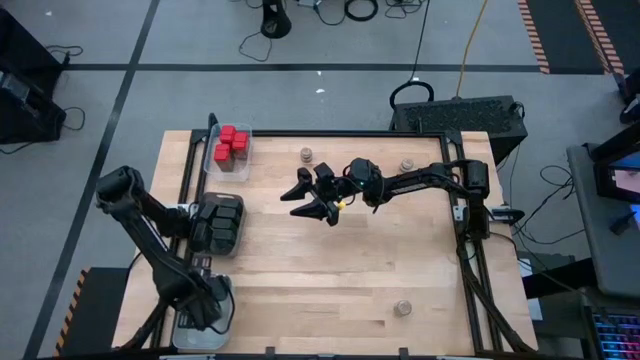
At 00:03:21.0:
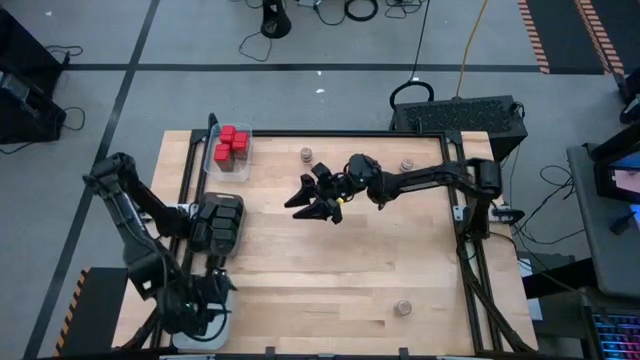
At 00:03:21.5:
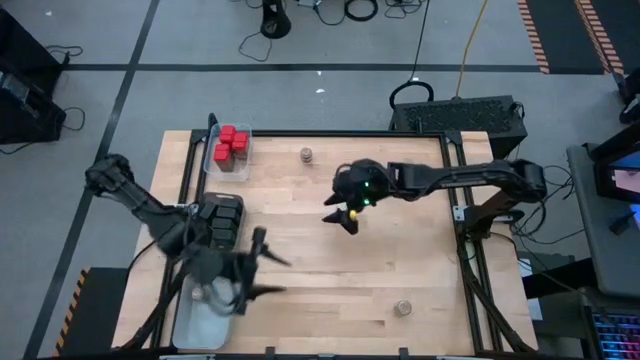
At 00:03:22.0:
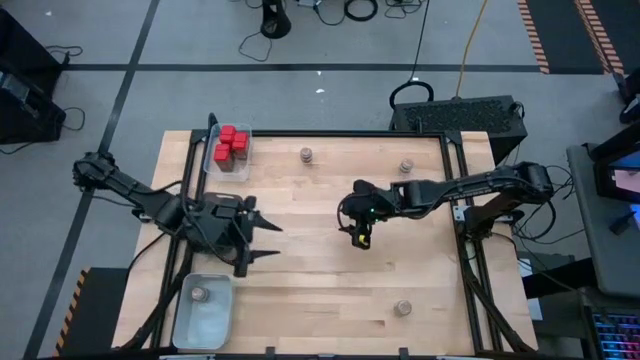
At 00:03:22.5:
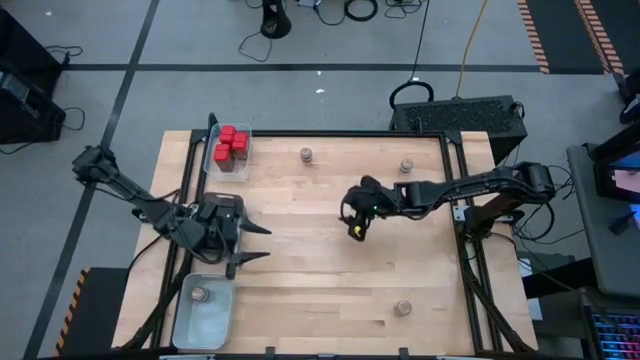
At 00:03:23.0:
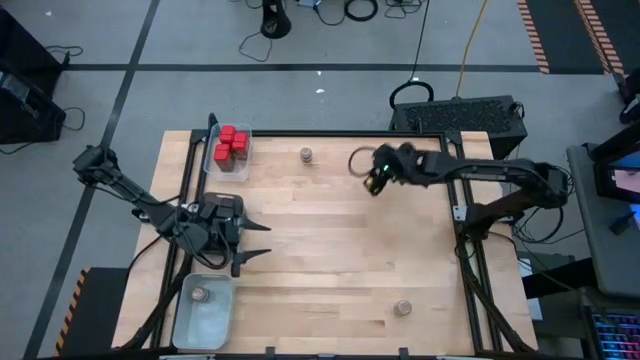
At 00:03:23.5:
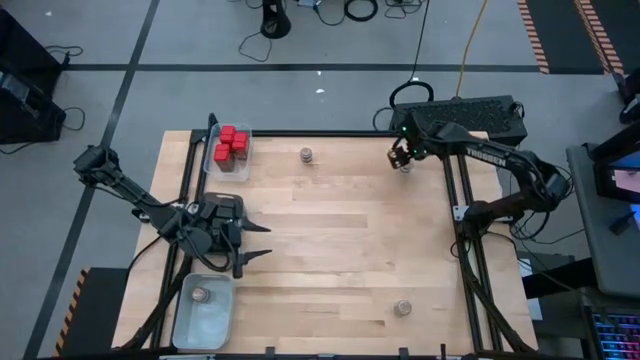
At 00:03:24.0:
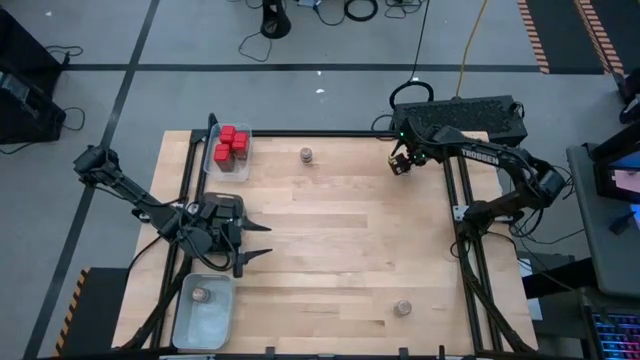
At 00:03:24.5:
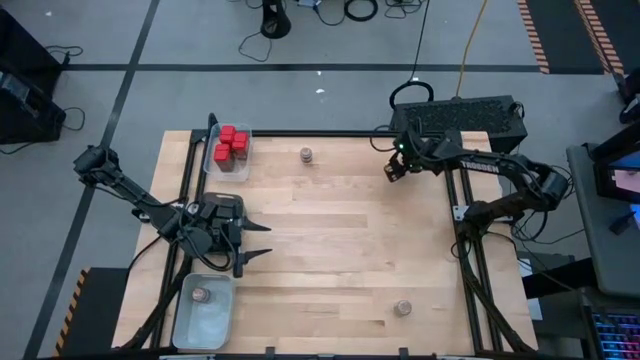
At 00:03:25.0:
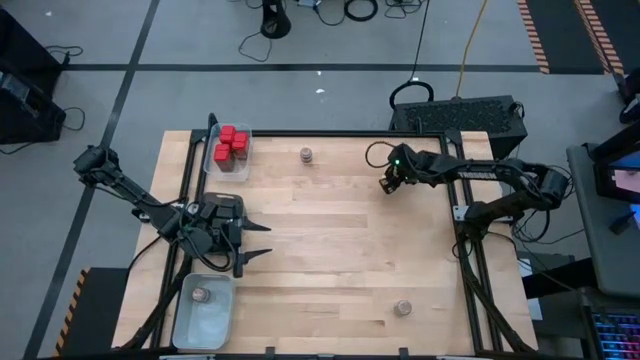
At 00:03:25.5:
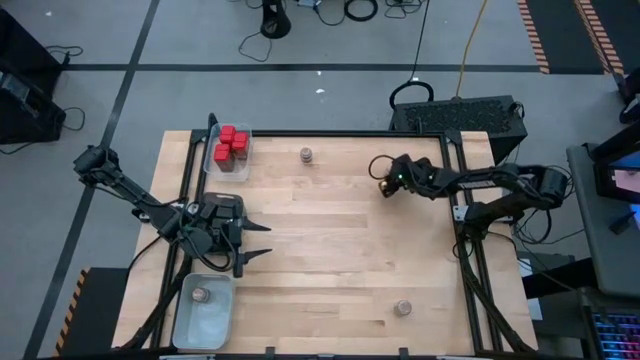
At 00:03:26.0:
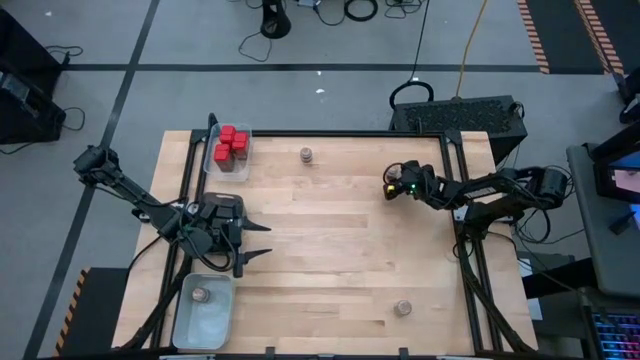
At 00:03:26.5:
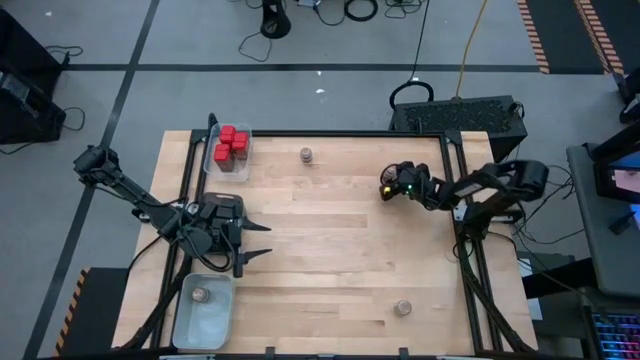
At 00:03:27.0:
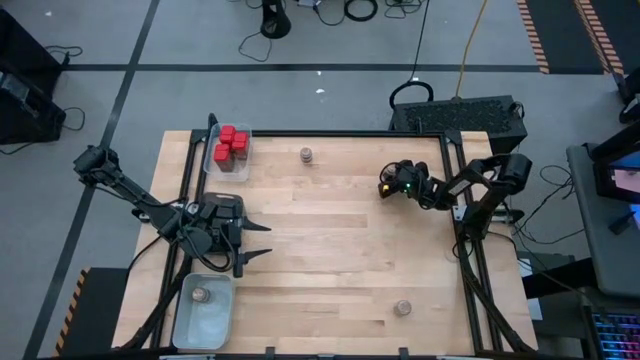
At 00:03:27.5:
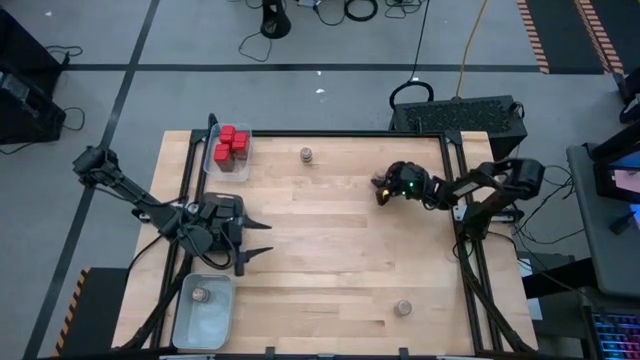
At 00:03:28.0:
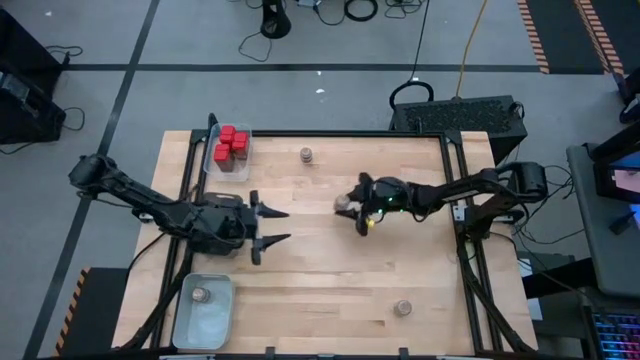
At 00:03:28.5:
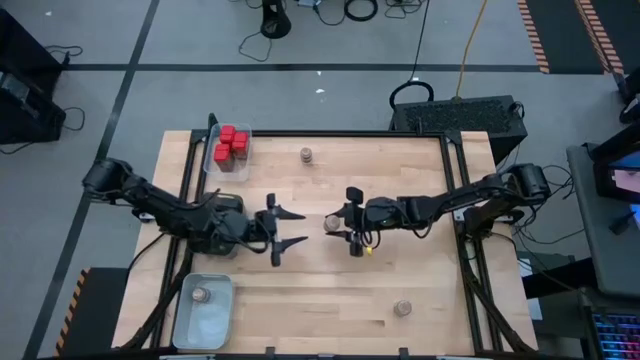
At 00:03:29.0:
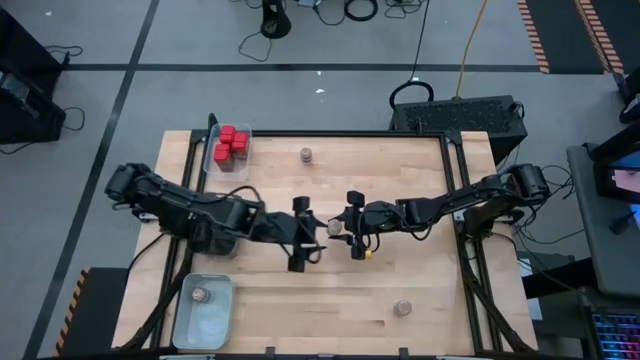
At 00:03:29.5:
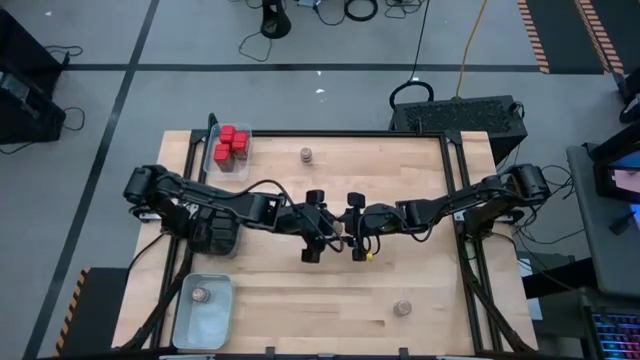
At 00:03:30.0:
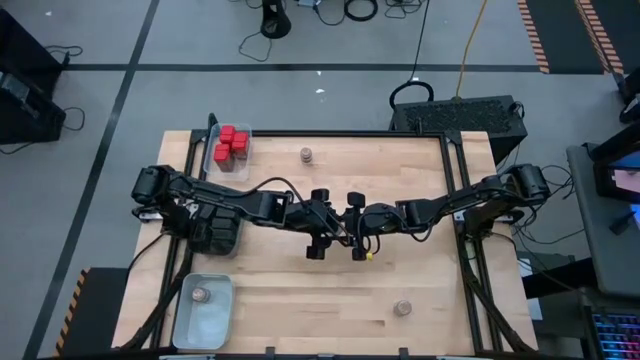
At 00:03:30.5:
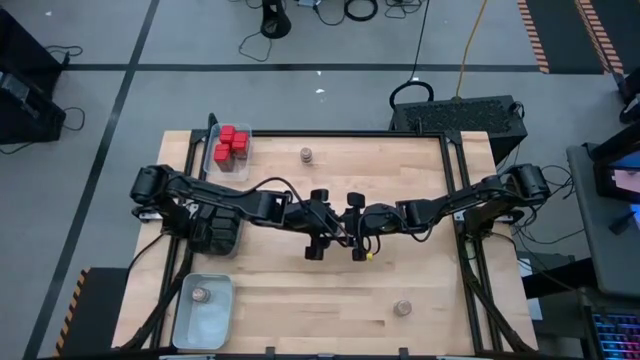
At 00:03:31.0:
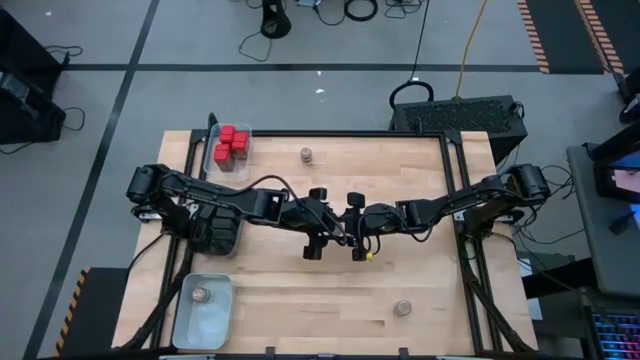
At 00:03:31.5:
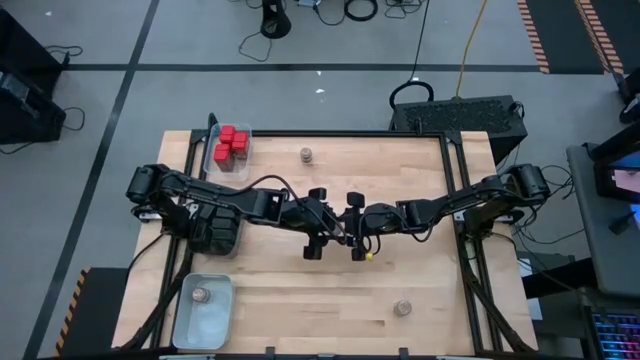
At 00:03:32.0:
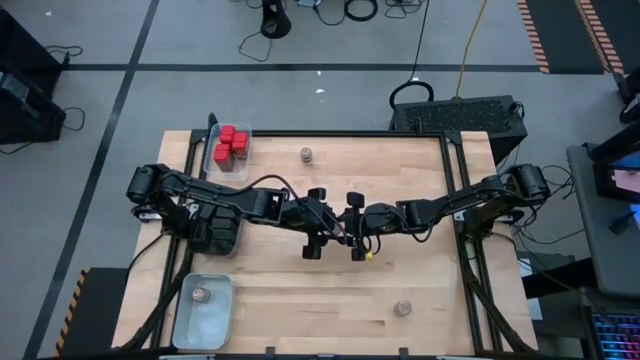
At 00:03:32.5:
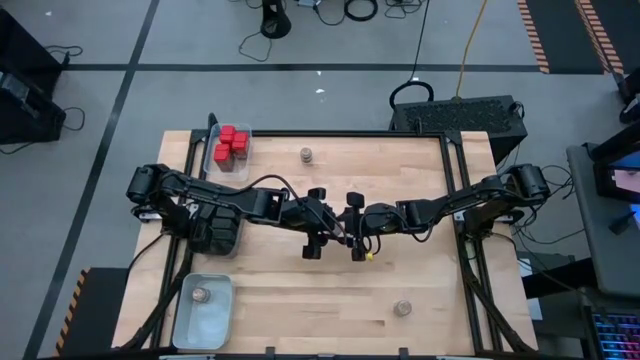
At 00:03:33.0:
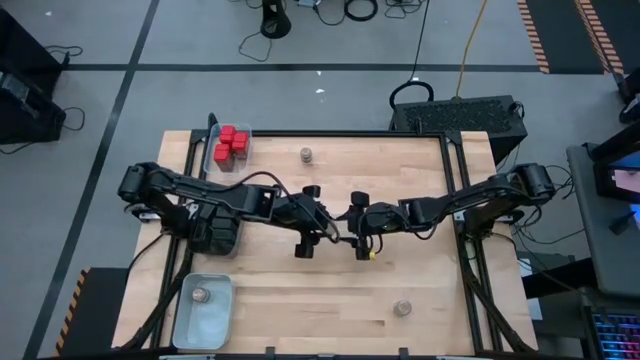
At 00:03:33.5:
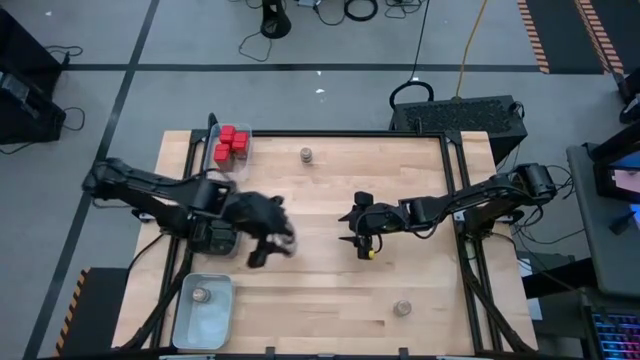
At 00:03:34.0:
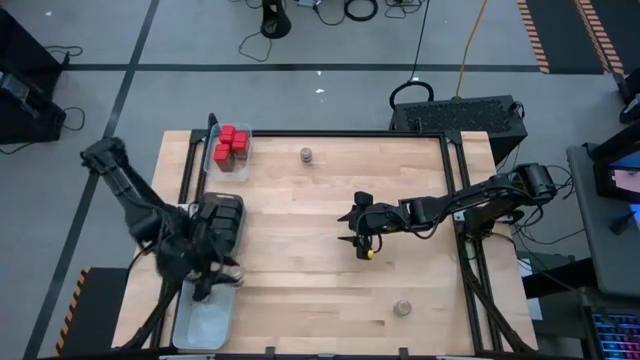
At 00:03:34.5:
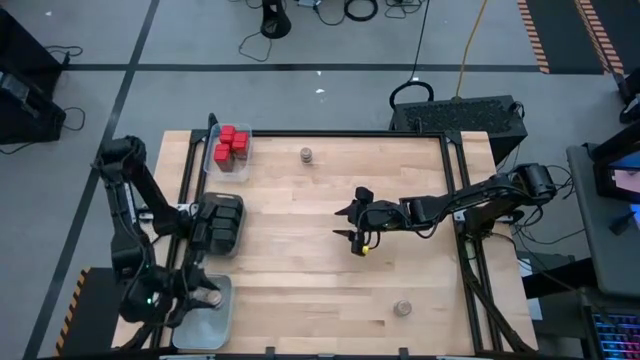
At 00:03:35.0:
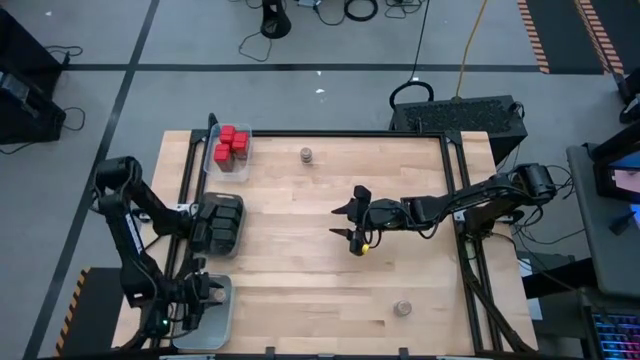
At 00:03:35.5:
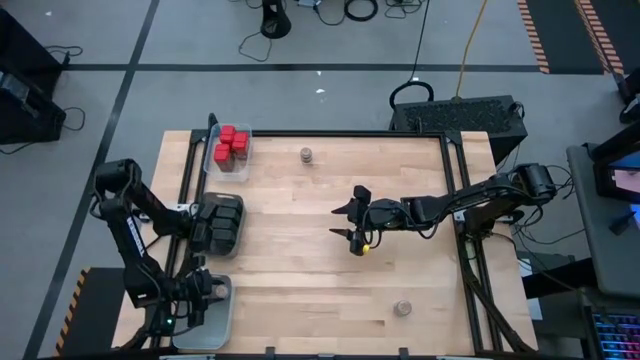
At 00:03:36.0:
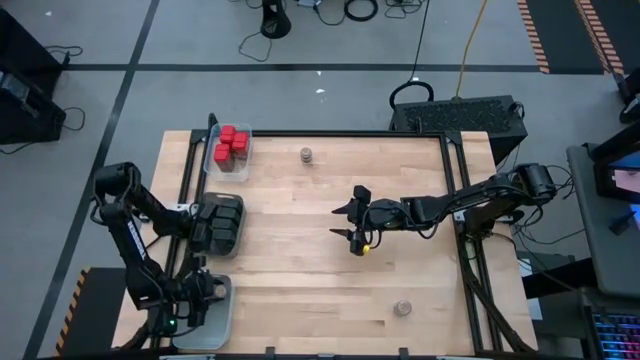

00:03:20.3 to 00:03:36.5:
Task: Sort spices by type
Put the brown seasoning bottle into the gray bin

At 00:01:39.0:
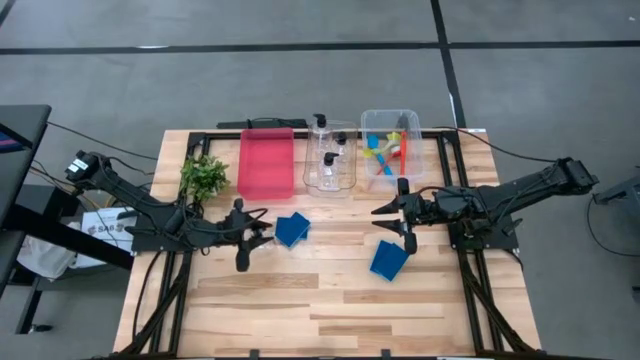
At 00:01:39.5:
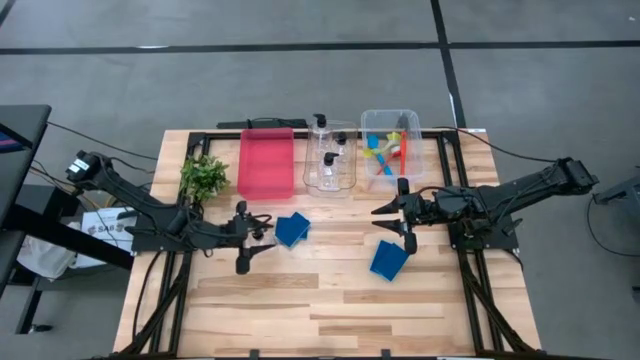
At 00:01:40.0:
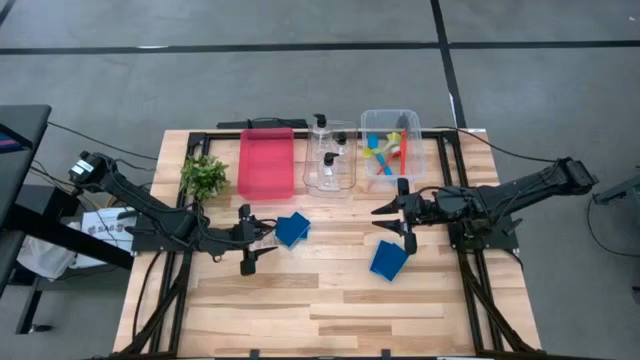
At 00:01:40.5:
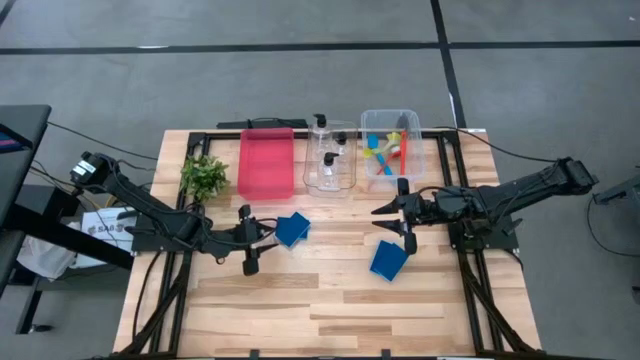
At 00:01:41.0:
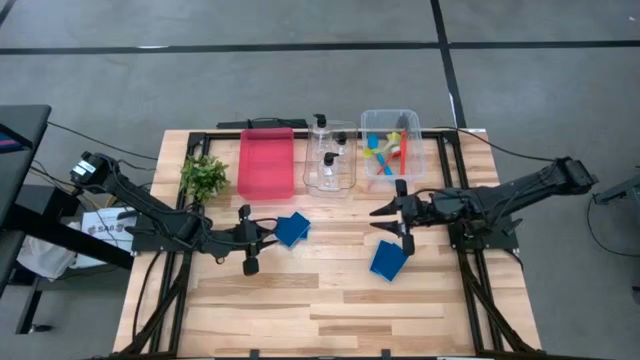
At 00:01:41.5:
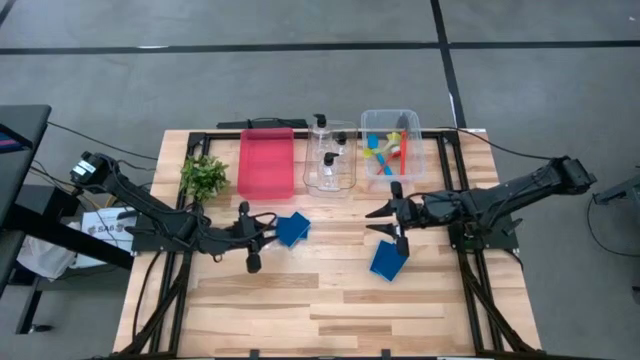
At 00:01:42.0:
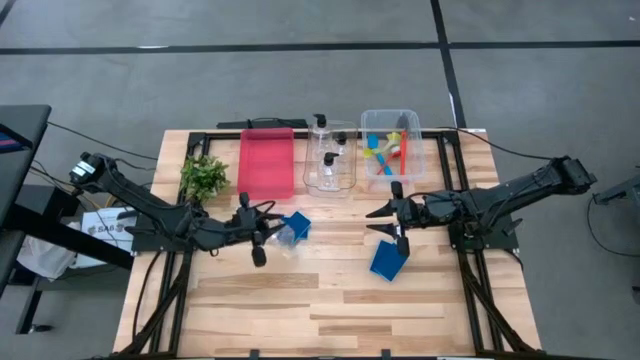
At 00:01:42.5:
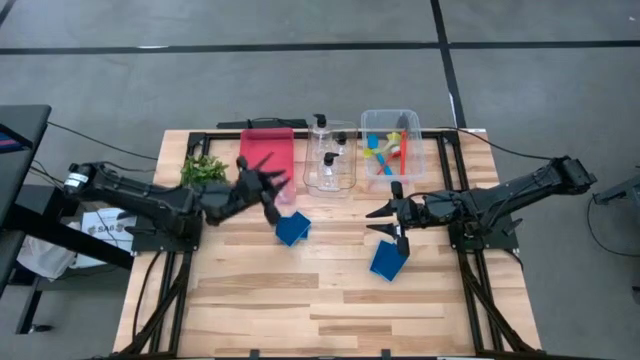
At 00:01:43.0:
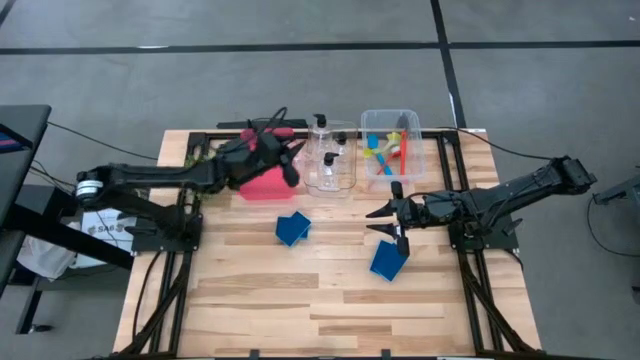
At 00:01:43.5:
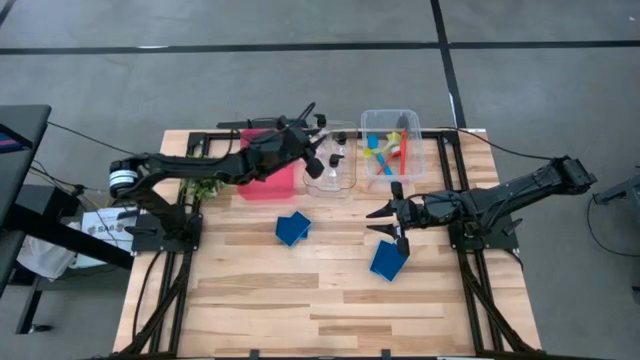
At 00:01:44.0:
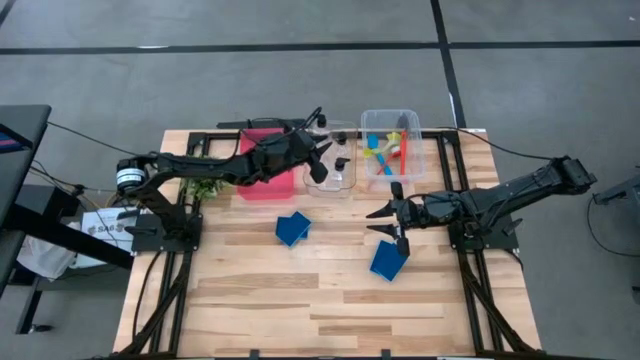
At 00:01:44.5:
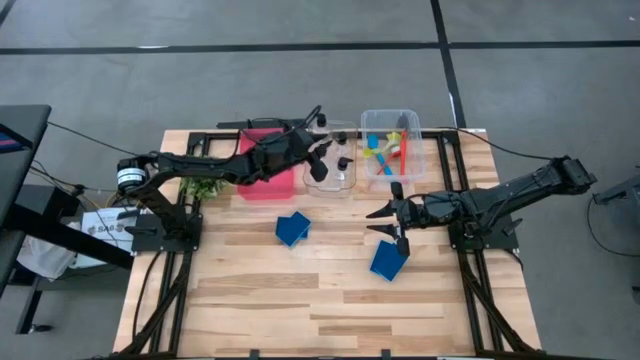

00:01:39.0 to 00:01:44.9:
Task: Pick & Place Kitchen Sink Supplies
Put the soap dispenser into the transparent bin
